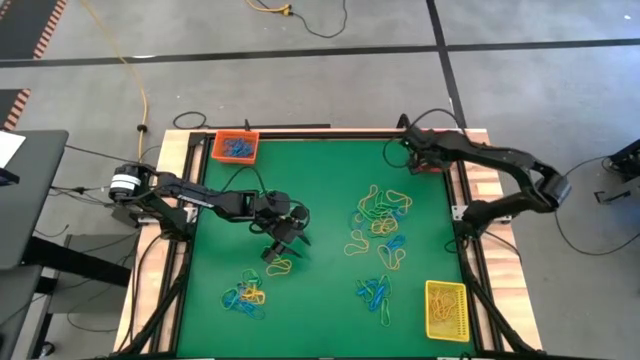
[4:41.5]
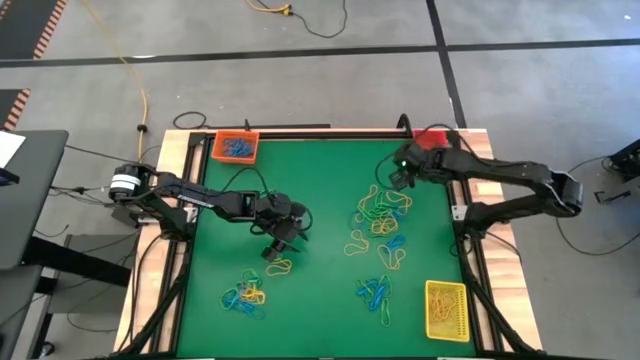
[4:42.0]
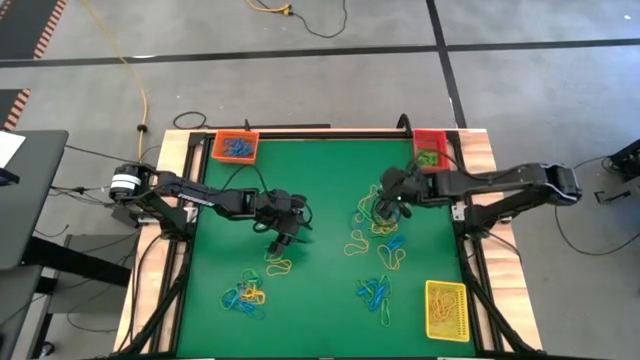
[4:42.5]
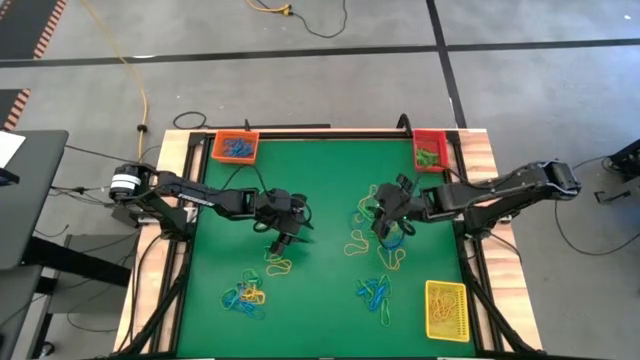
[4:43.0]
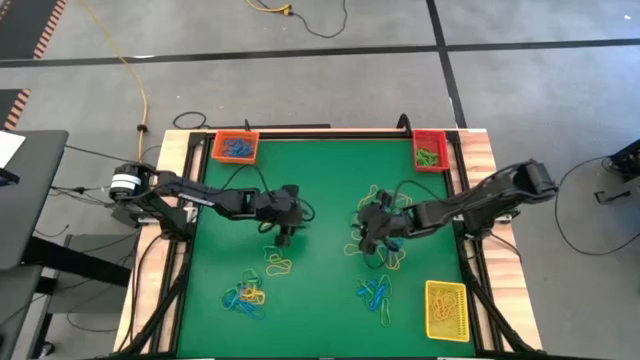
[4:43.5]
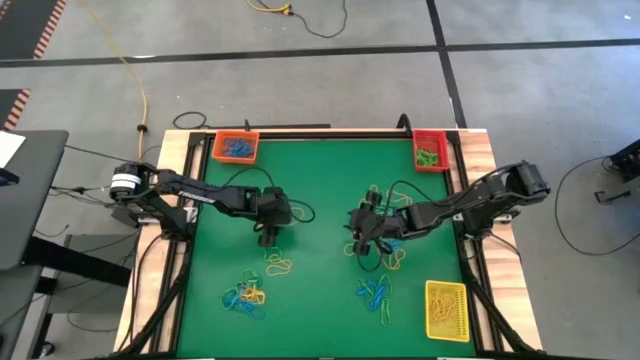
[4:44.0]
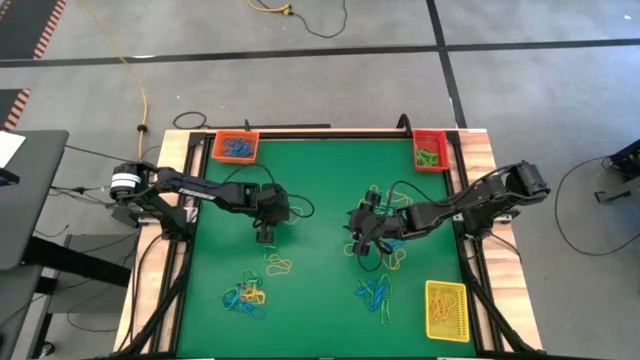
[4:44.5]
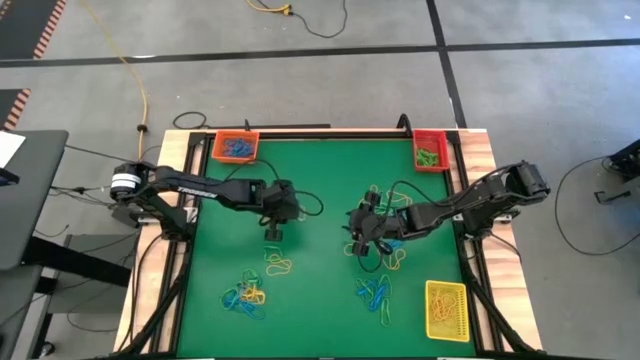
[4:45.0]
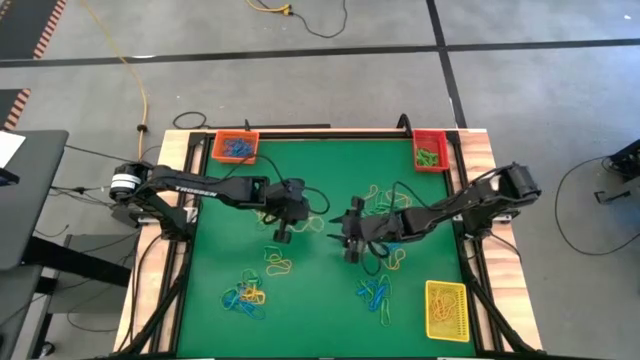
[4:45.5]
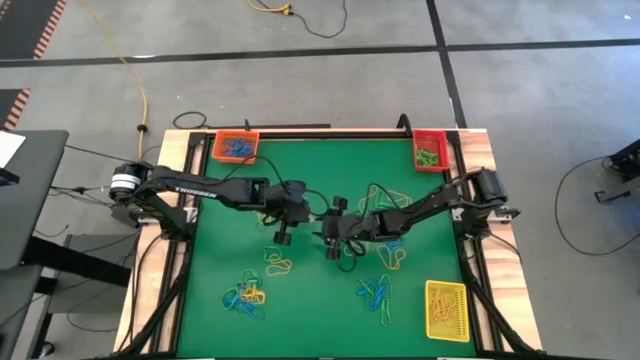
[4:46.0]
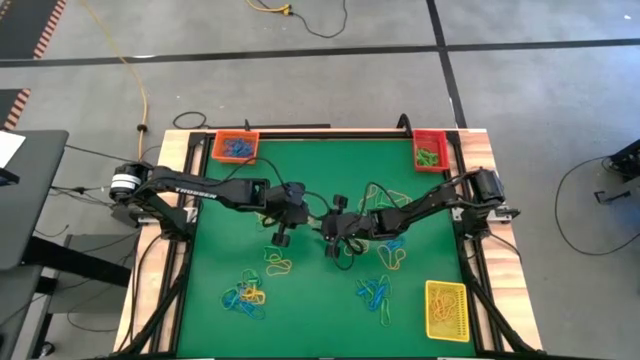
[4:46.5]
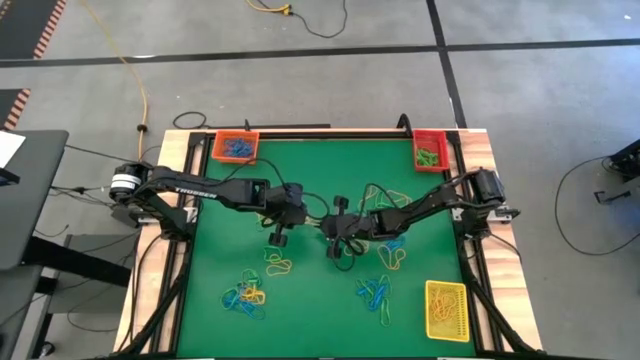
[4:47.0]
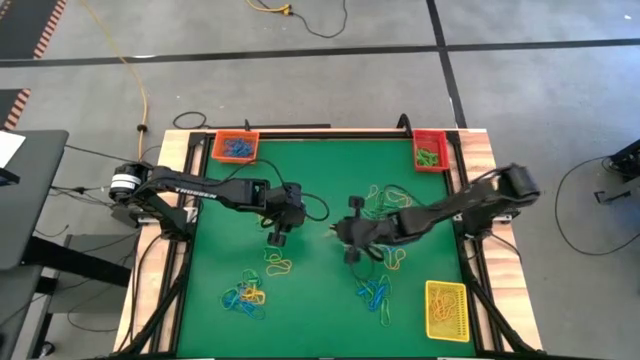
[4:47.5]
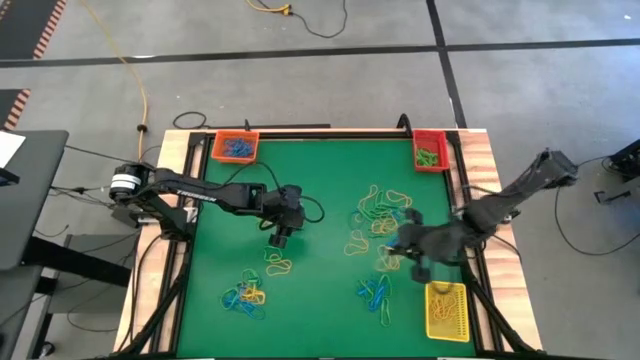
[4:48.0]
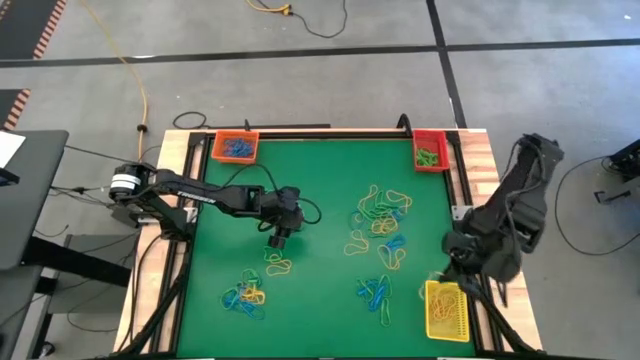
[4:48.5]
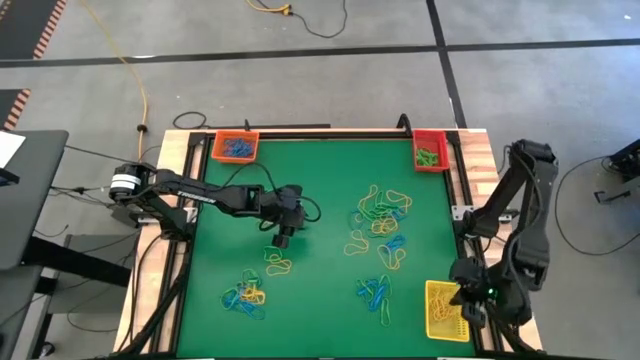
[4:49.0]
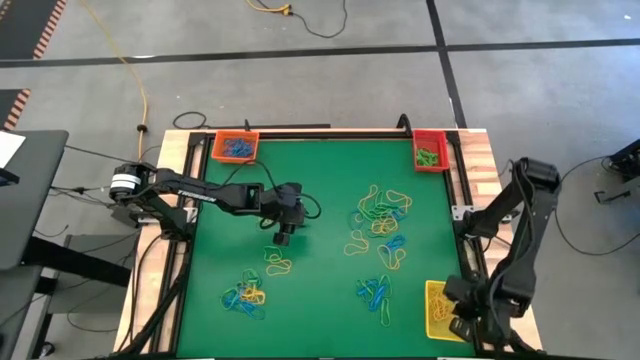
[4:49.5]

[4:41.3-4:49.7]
Task: Sort rubber bands into baskets
Put the top left yellow rubber band into the yellow bin

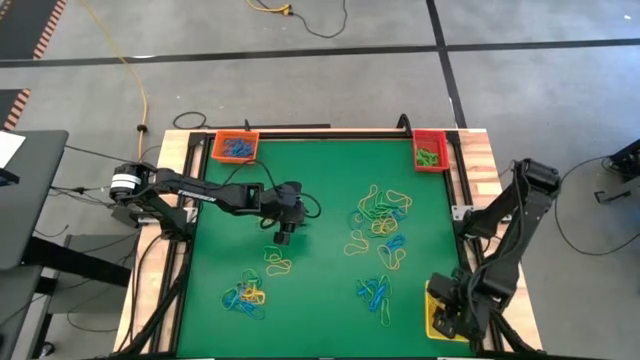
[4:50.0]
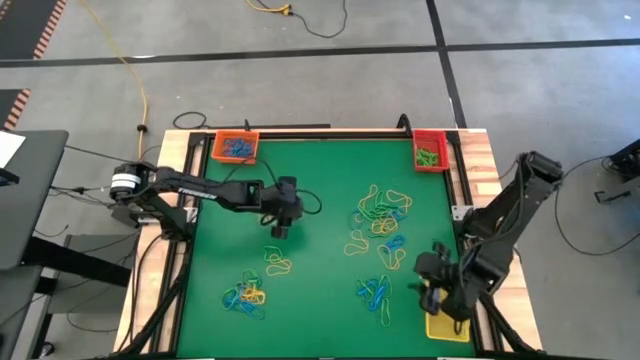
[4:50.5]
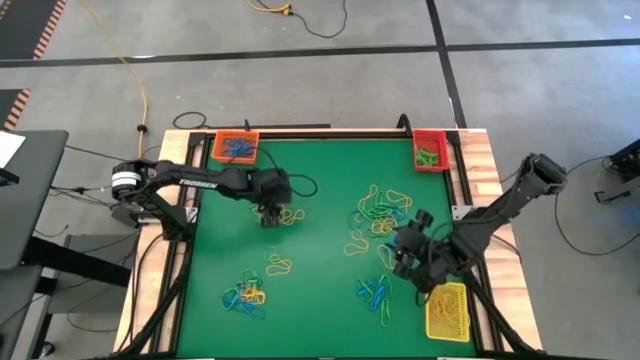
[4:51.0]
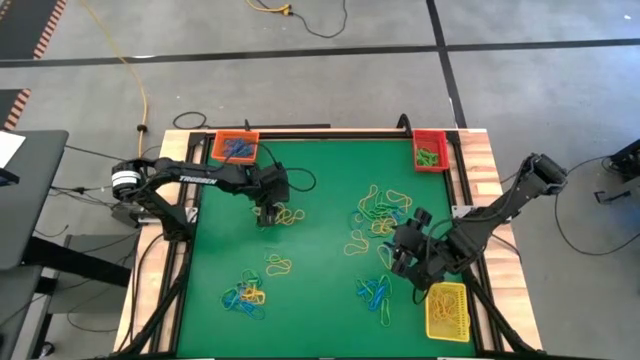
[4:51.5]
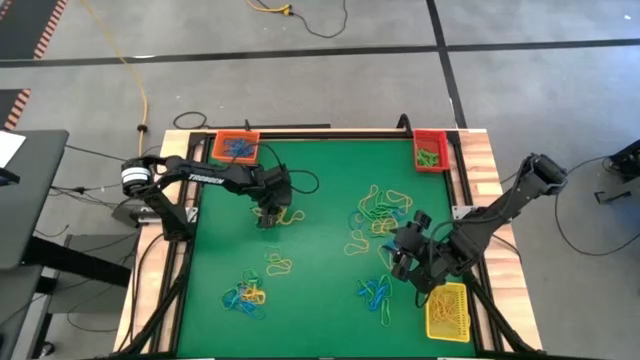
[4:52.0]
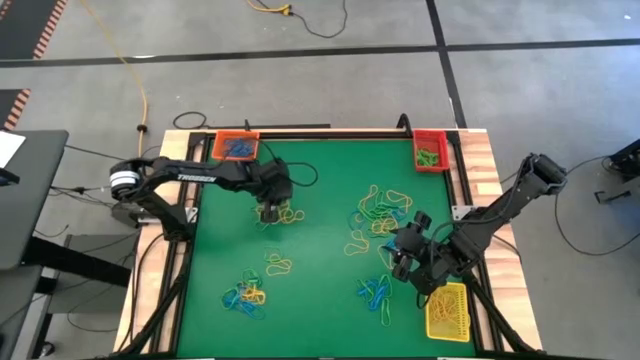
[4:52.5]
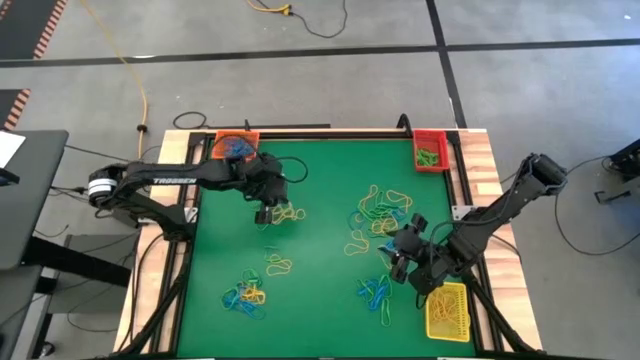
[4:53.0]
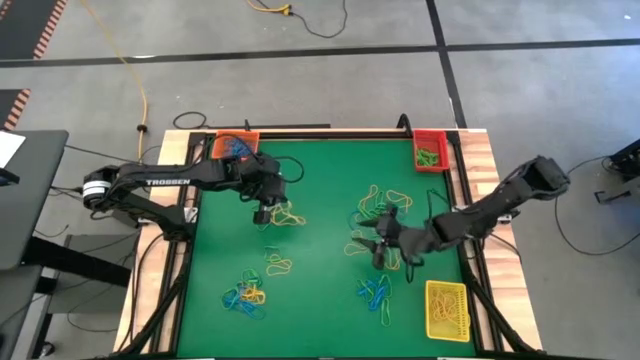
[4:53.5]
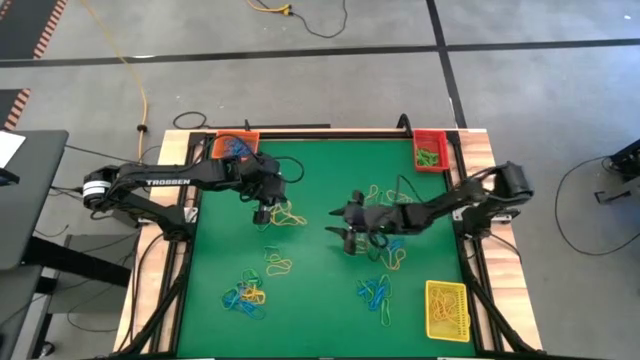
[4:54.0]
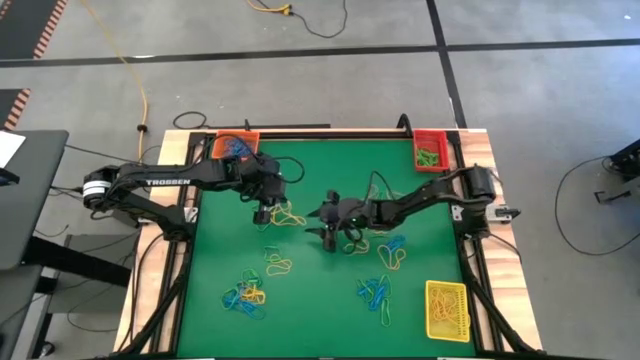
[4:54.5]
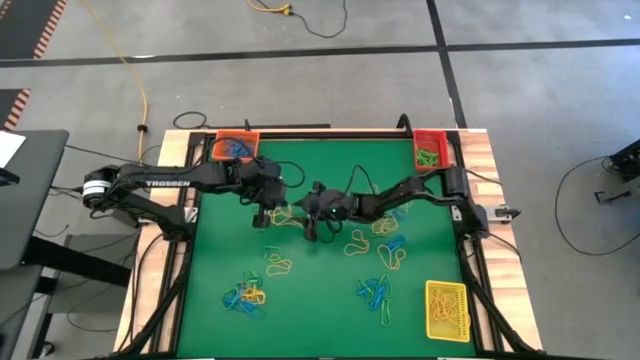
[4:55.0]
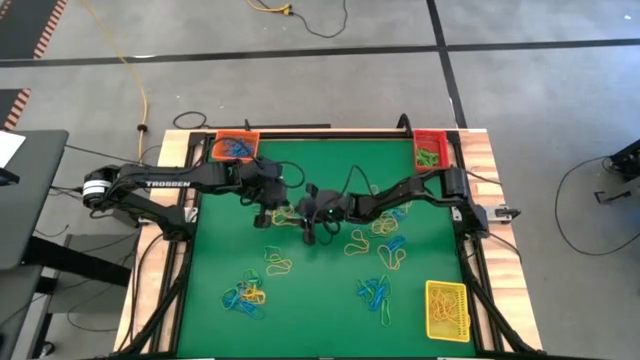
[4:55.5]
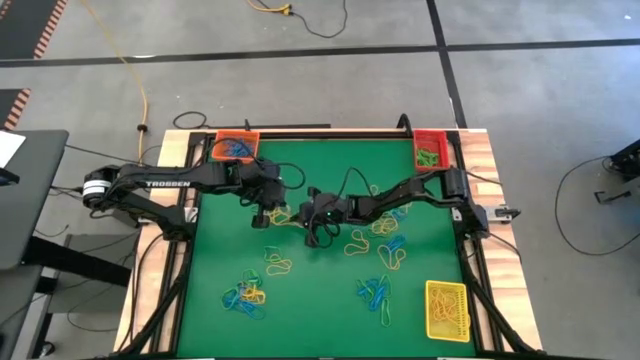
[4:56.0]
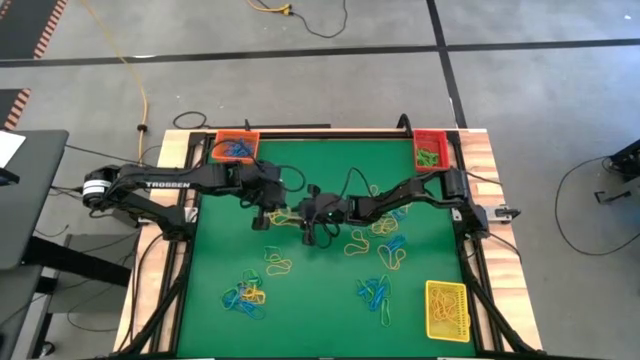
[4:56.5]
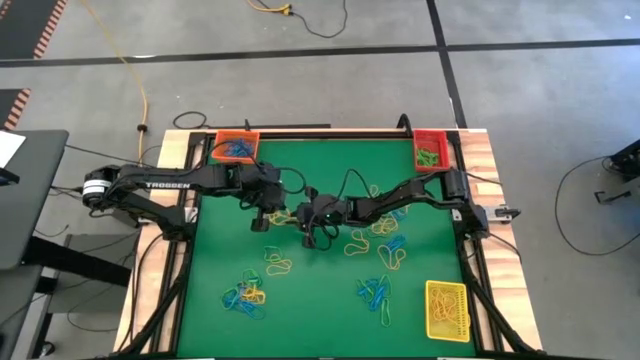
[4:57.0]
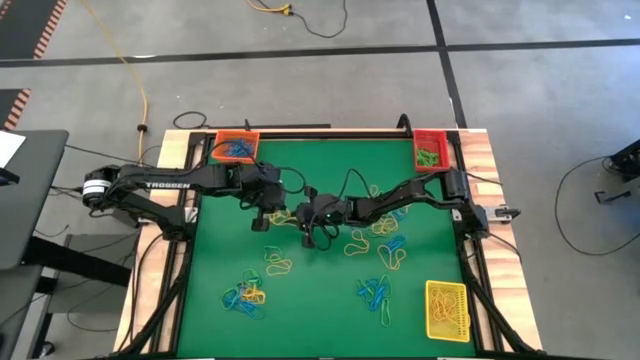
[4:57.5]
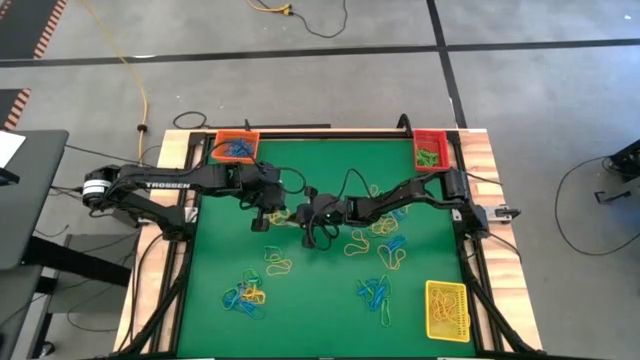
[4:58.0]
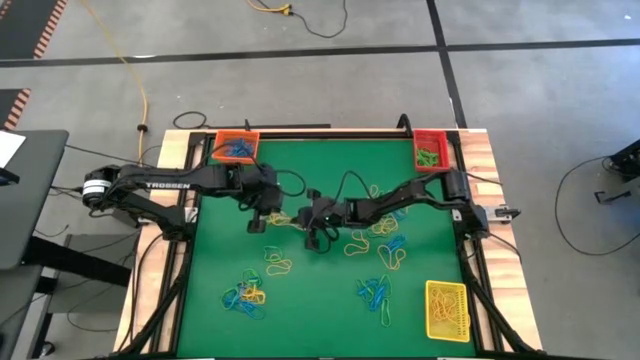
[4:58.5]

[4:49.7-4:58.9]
Put the top left yellow rubber band into the yellow bin
